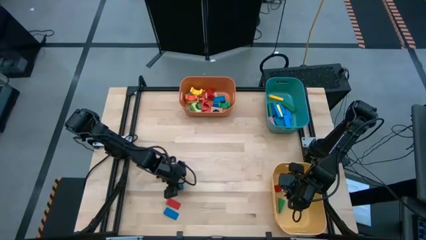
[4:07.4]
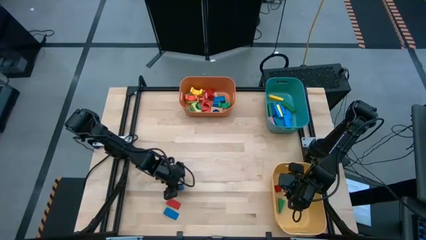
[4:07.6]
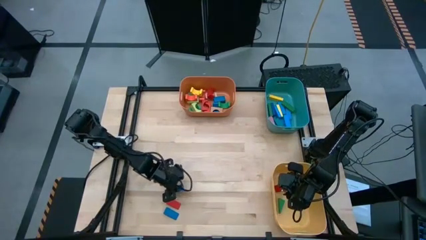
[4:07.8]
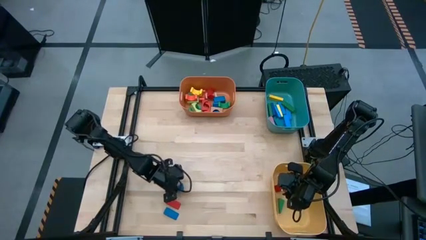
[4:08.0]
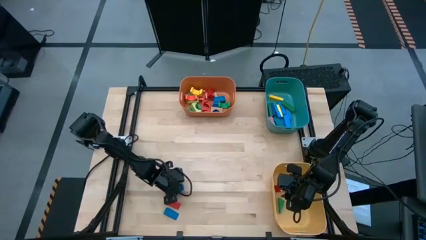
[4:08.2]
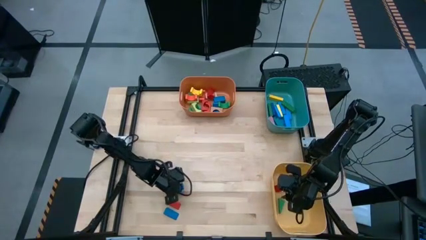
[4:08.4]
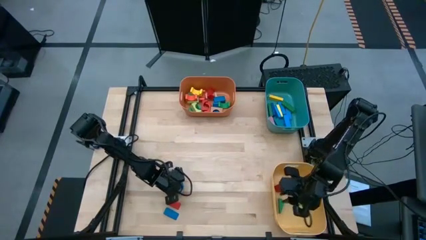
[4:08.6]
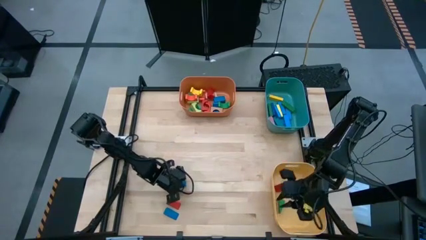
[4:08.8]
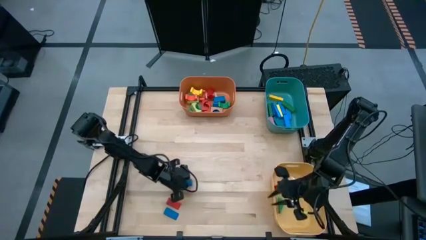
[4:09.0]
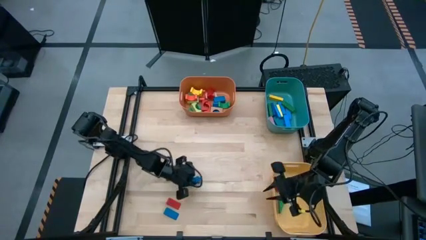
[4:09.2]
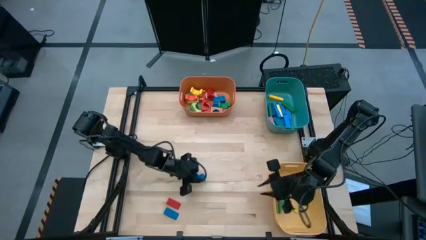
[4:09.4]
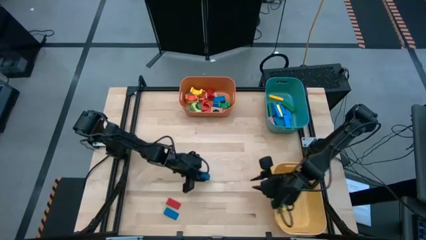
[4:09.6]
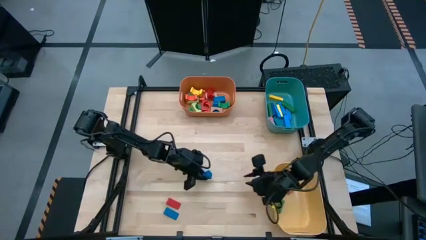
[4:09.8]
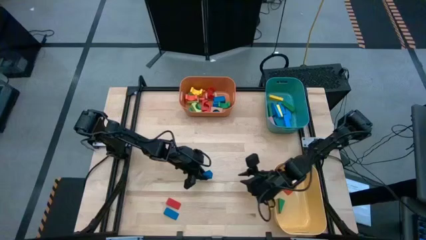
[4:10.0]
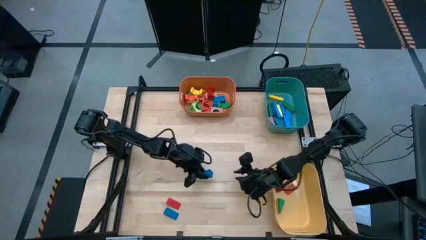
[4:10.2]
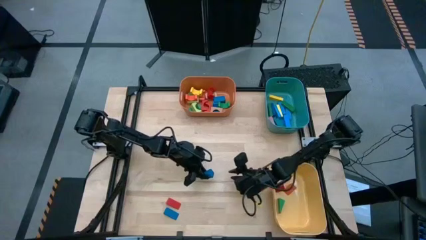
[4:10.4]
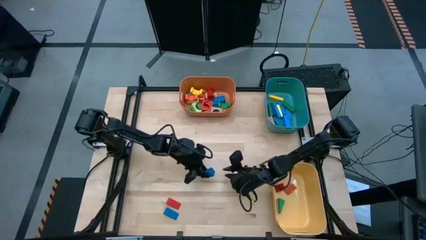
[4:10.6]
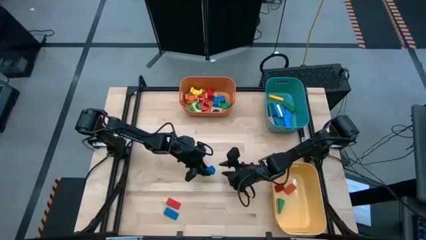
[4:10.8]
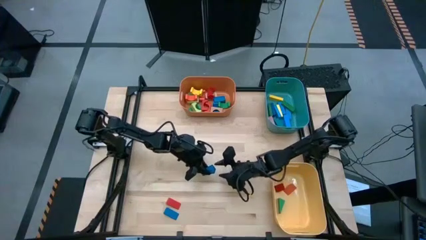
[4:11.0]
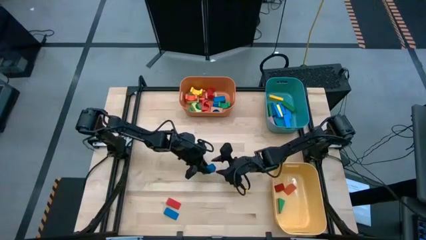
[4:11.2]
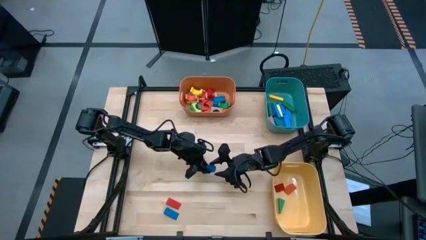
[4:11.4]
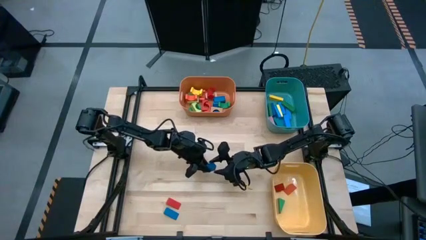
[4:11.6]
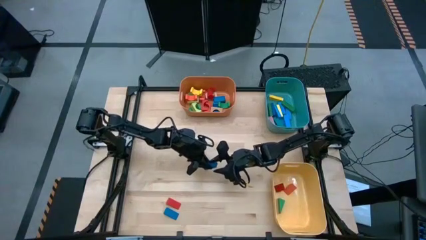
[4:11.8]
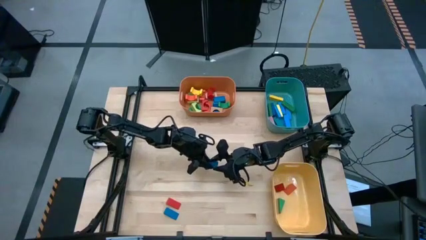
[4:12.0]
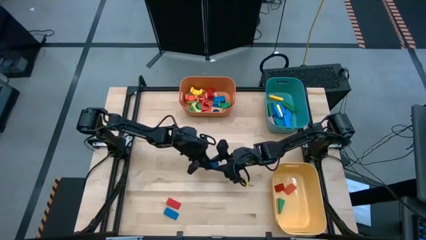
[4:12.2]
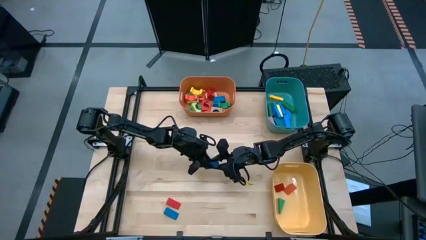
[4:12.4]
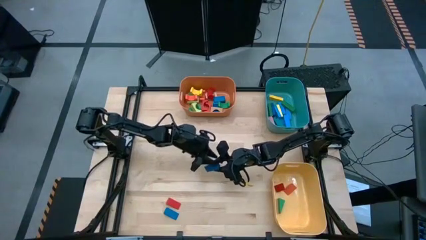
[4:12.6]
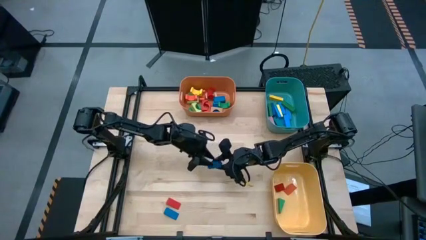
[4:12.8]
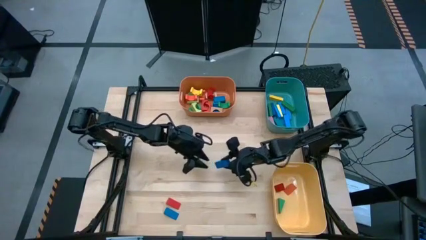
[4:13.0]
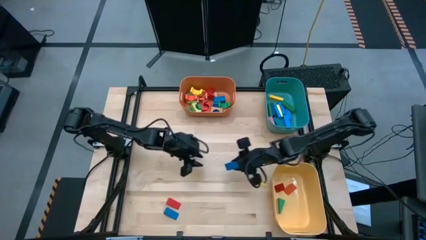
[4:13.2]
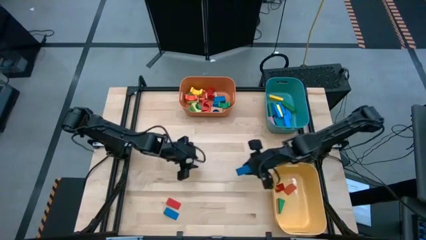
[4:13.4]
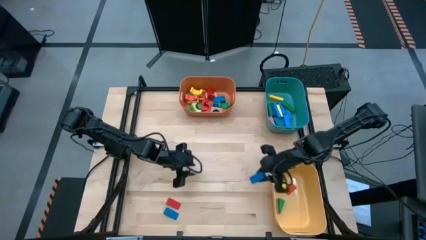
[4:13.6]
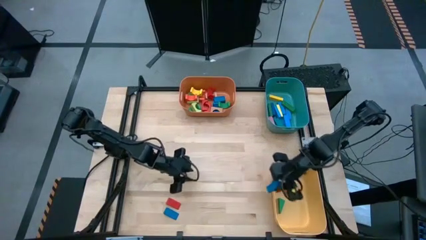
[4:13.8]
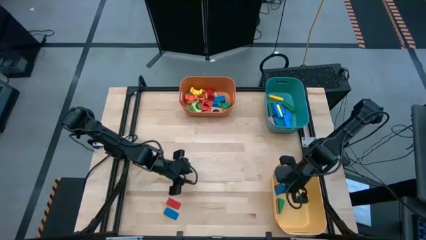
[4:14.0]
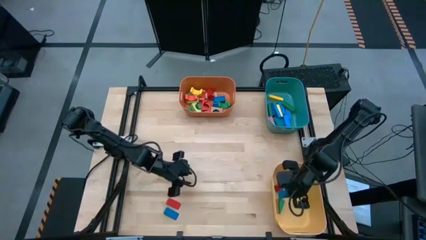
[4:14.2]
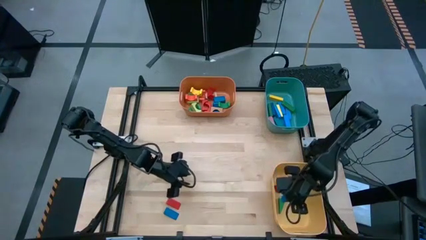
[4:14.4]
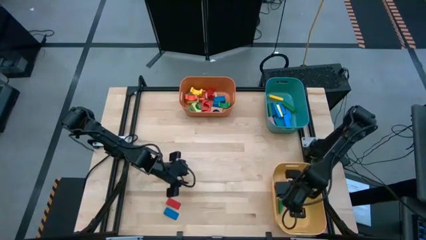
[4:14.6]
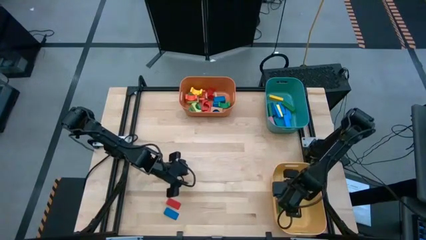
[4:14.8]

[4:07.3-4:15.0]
Task: Sort blocks by size
Put the blue triangular block into the yellow bin

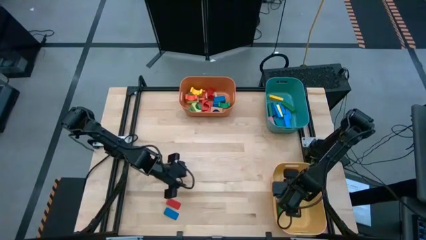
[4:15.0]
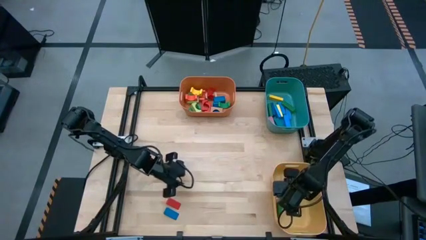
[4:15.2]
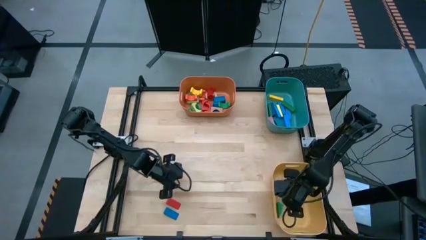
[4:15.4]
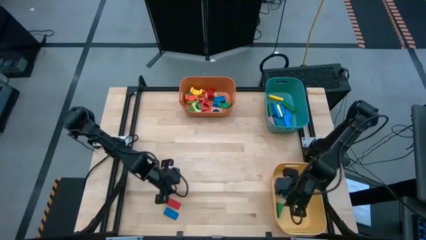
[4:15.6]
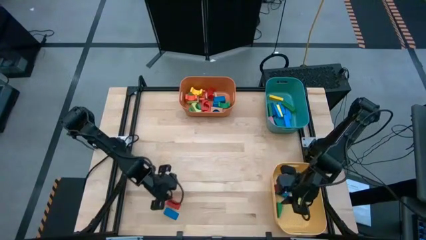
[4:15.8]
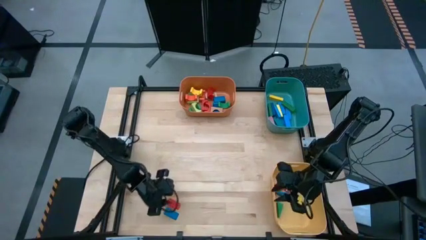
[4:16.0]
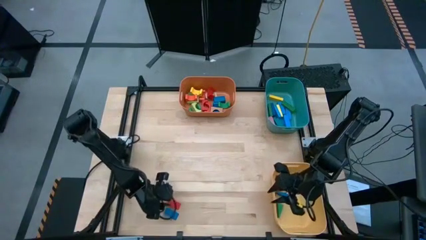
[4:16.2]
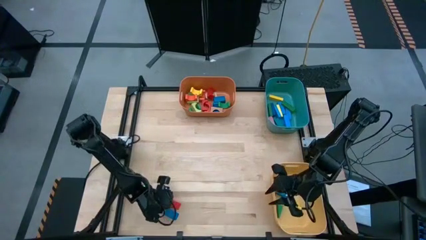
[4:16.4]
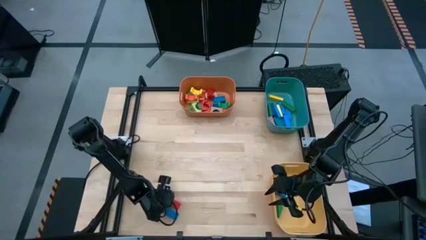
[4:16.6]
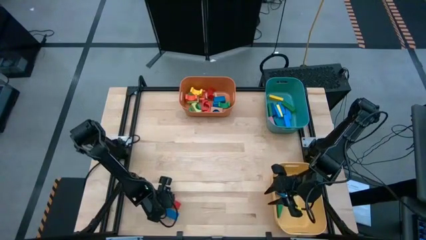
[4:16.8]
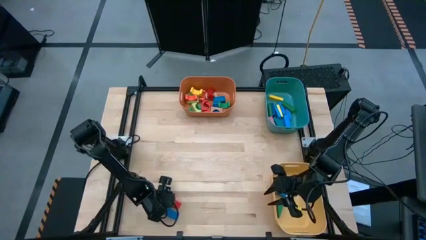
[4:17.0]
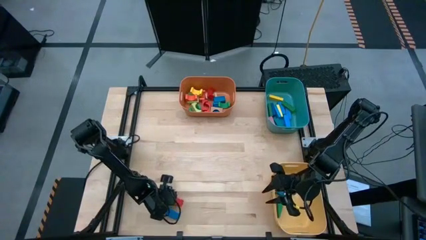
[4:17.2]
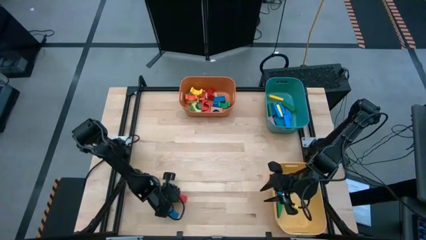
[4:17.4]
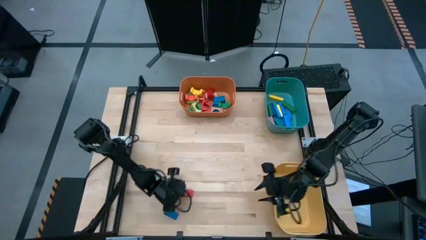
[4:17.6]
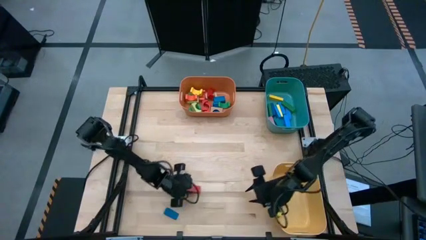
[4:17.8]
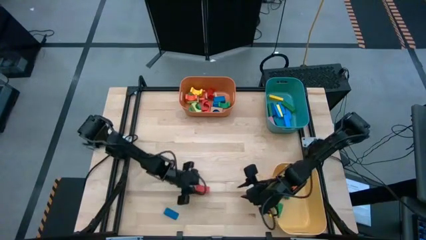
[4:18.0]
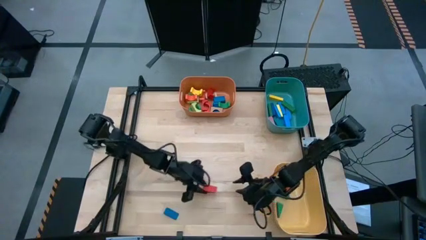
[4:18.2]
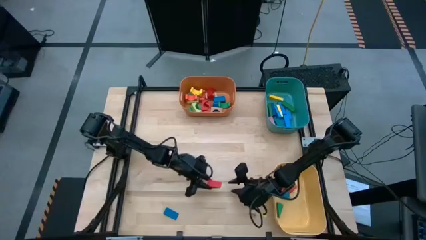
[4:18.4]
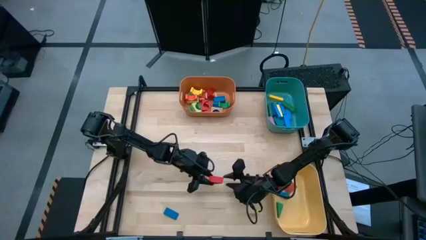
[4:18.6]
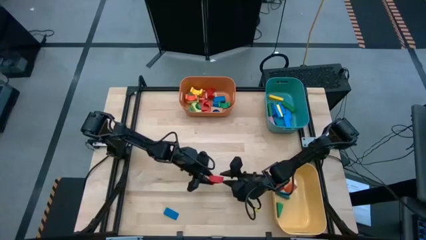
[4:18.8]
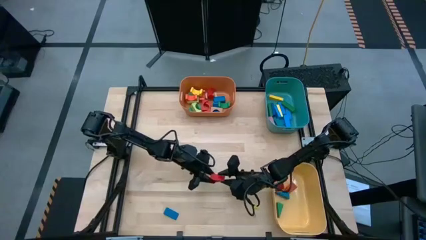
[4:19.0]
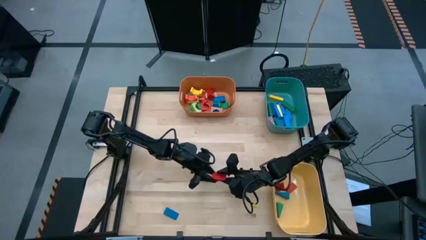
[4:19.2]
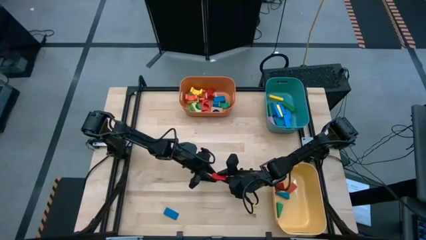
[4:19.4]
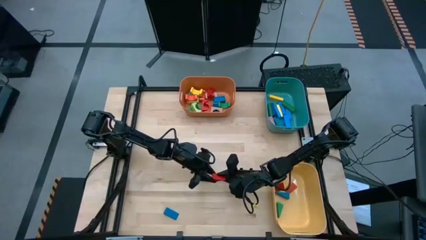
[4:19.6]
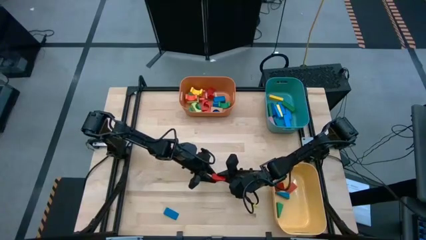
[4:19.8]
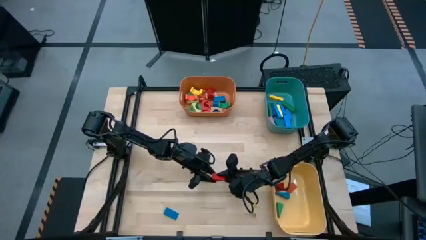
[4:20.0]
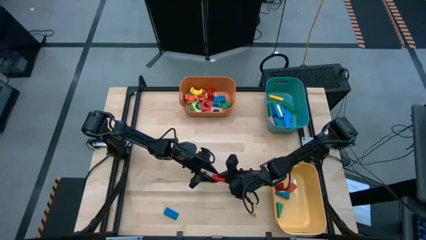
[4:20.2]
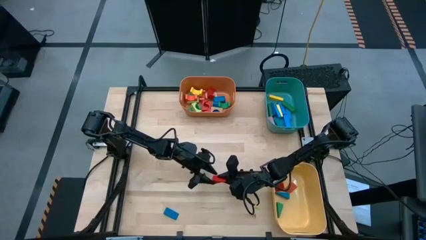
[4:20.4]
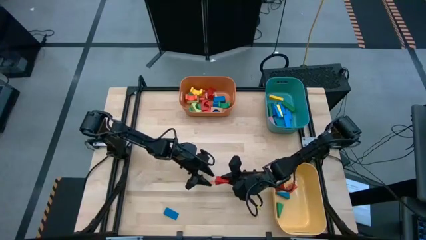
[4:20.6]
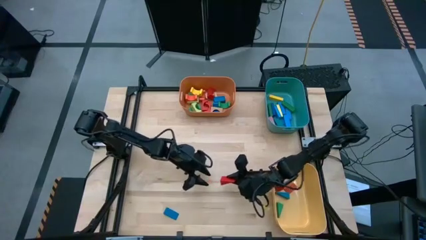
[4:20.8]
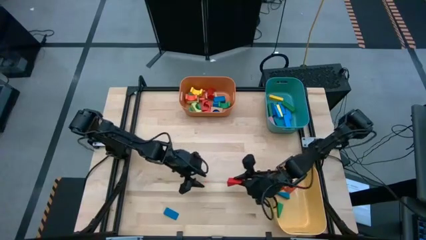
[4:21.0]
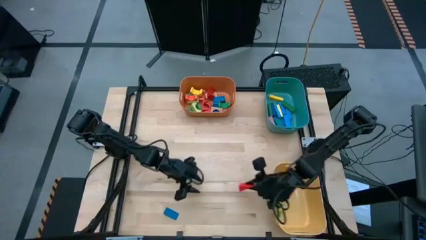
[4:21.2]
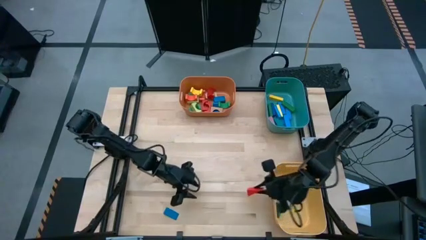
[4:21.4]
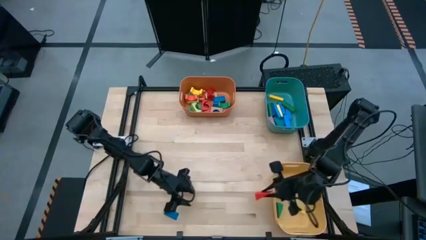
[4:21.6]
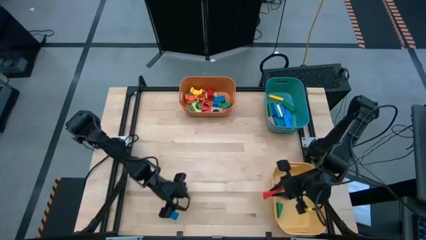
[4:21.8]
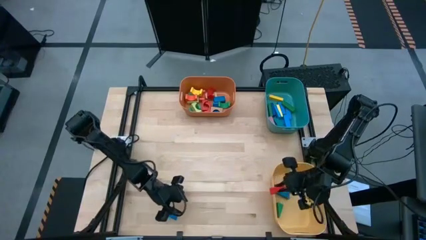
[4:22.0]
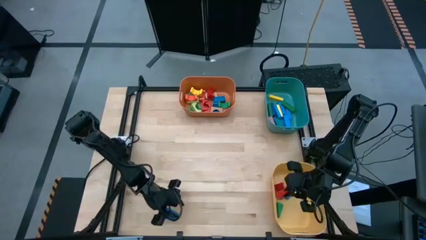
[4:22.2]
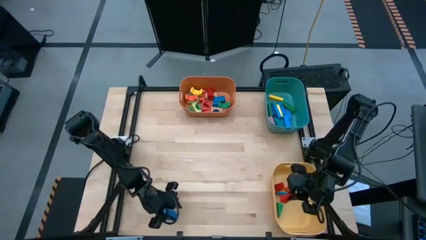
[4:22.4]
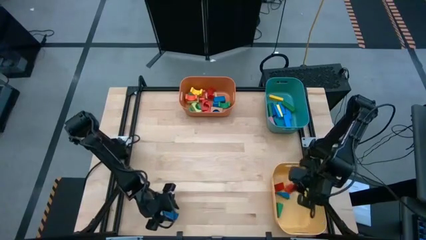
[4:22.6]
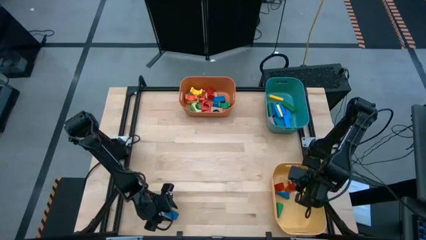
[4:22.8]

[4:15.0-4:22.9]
Put the red triangular block into the yellow bin
